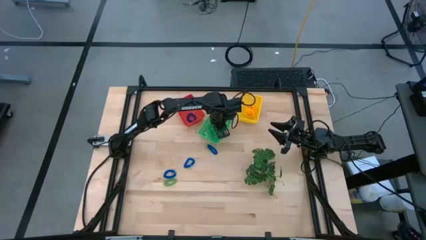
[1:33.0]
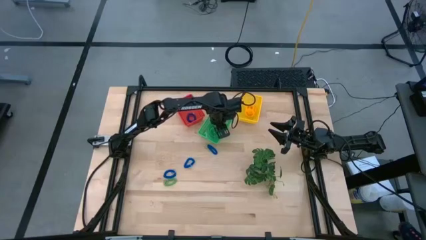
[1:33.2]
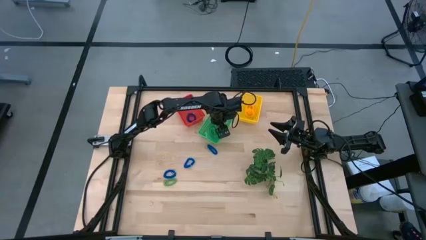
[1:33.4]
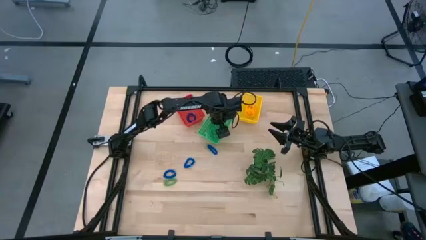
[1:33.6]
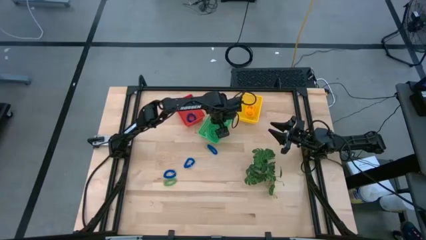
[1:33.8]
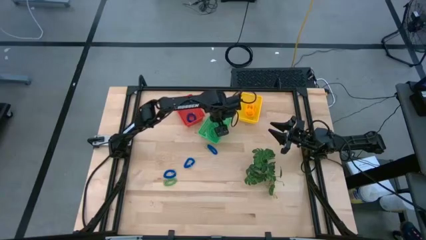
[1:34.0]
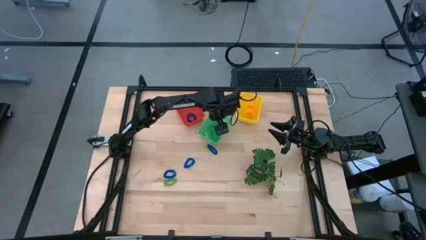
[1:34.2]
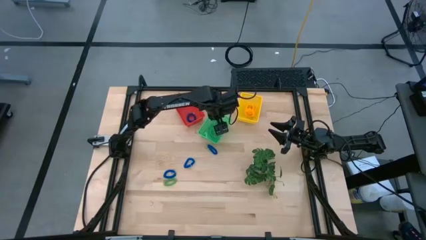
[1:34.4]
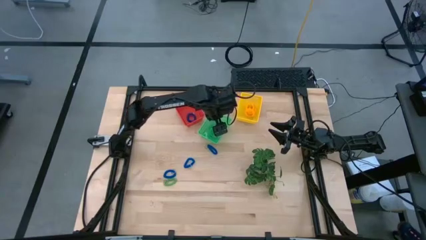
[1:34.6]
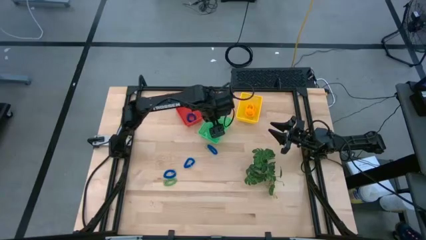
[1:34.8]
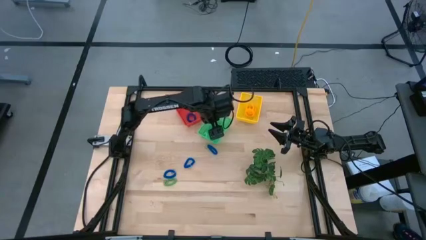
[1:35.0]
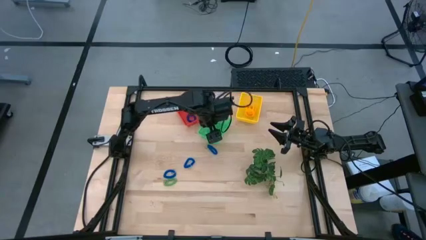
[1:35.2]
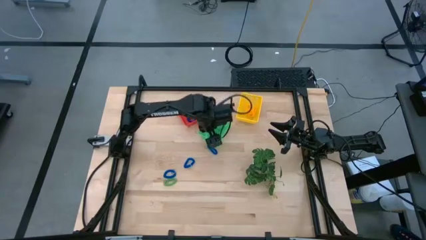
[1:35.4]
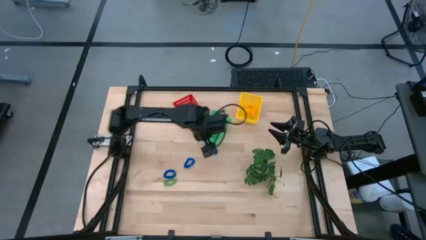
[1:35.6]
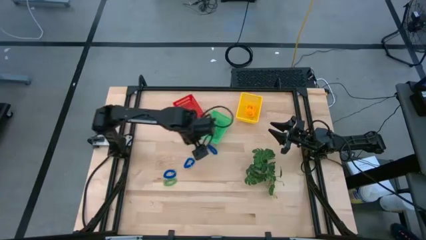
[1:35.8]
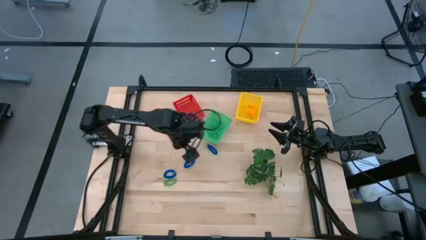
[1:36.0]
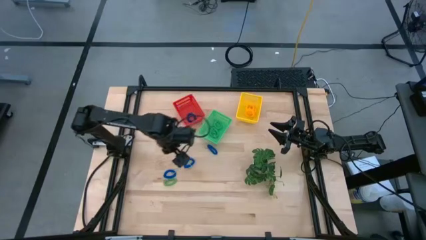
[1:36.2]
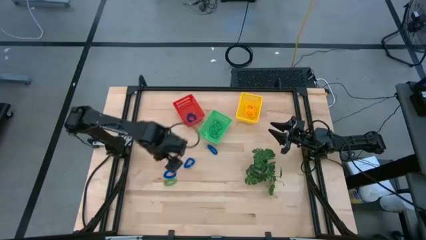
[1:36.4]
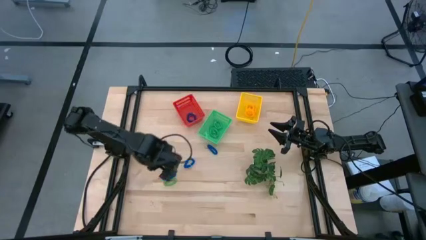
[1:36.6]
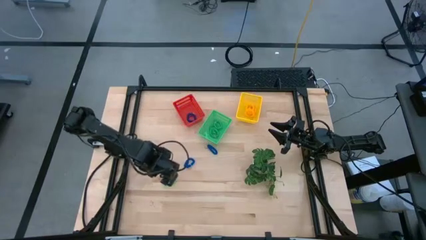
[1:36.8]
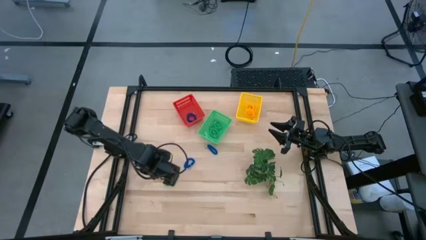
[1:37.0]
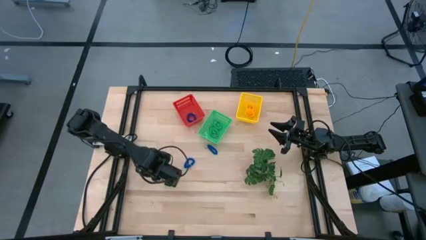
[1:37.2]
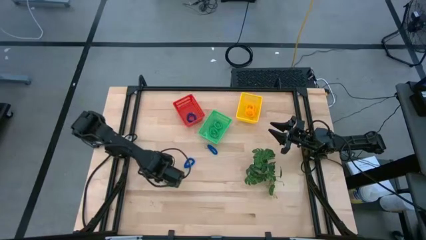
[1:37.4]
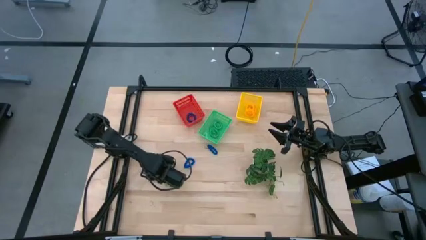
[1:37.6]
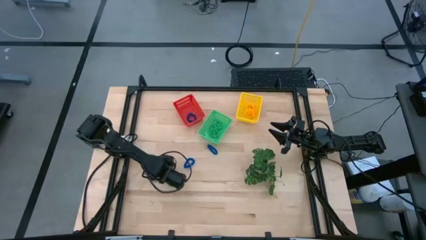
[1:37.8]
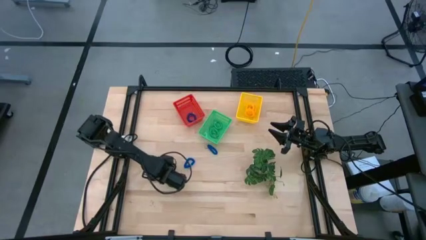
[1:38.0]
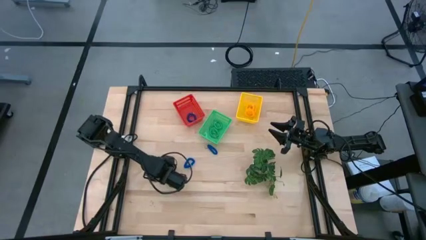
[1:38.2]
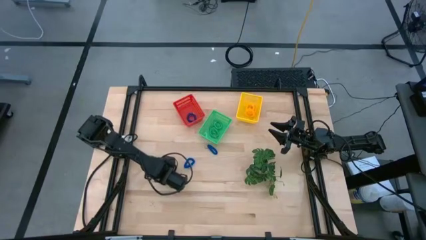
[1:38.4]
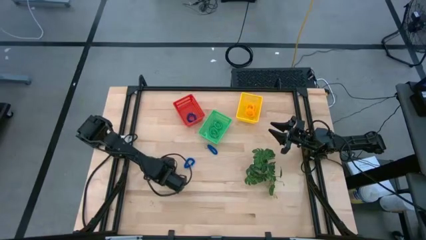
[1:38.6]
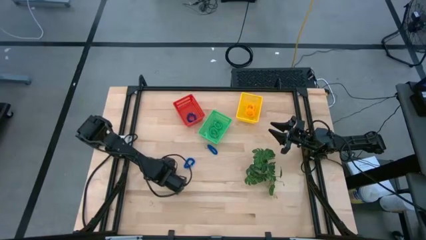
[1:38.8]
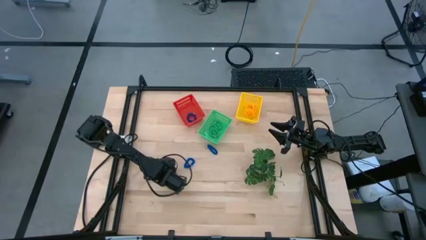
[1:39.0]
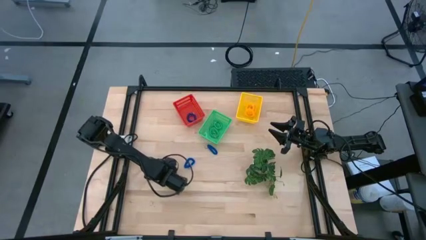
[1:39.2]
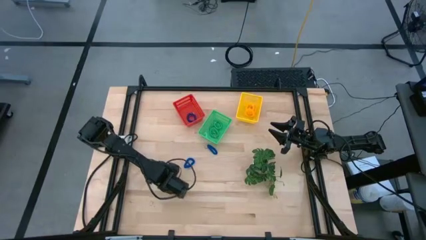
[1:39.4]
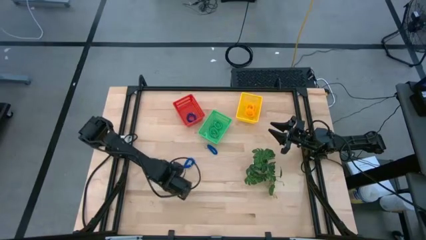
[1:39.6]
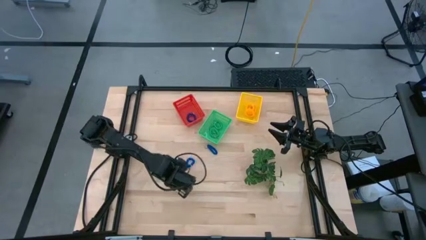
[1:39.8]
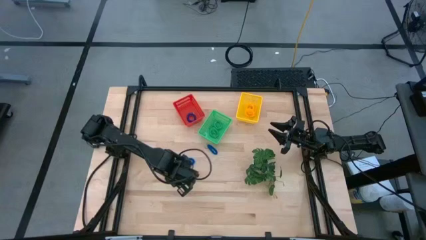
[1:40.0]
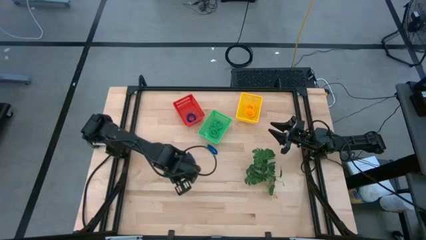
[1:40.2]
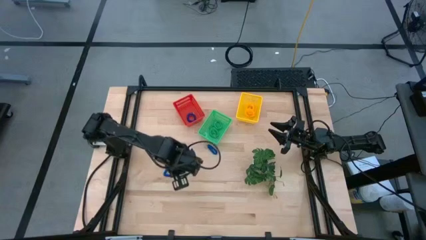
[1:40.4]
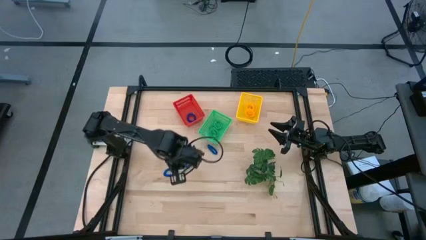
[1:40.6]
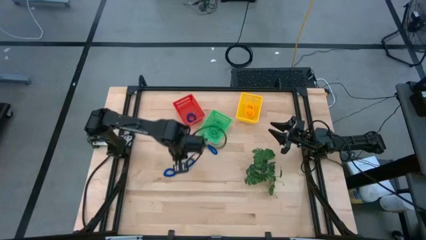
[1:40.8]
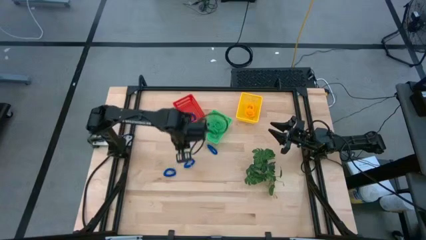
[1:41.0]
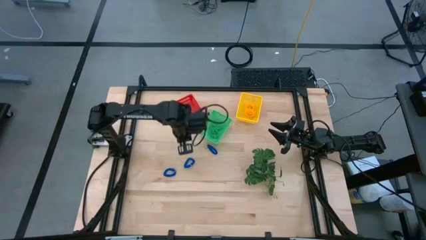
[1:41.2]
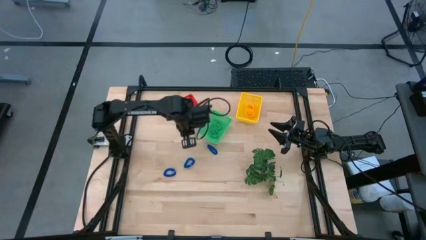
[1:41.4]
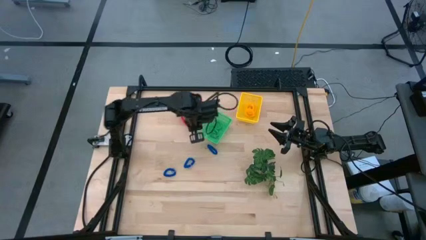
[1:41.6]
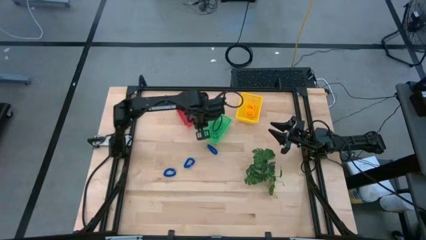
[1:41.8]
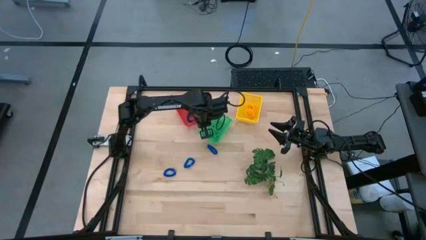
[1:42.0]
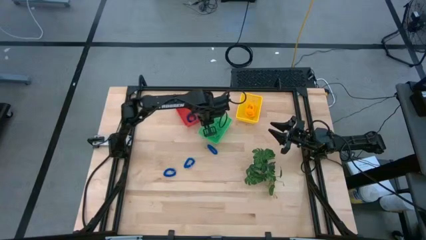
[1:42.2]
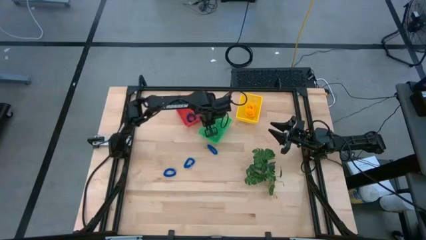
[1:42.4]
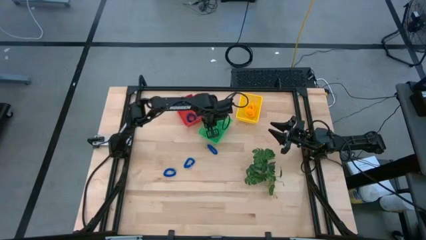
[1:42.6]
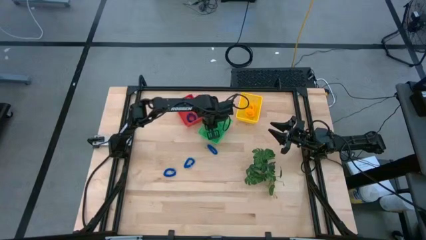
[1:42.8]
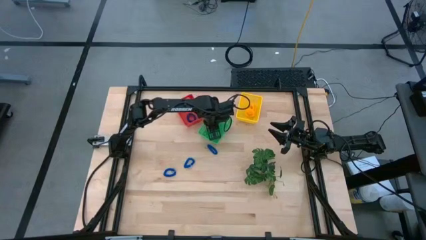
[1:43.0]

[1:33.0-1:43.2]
Task: Sort spring keychains
Put the green spring keychain into the green bin

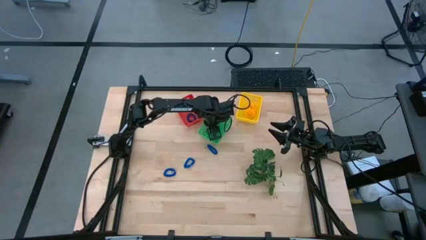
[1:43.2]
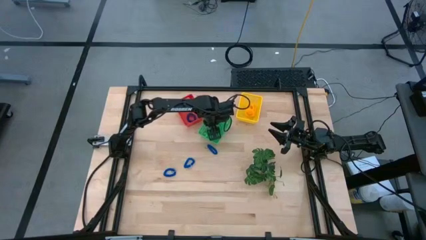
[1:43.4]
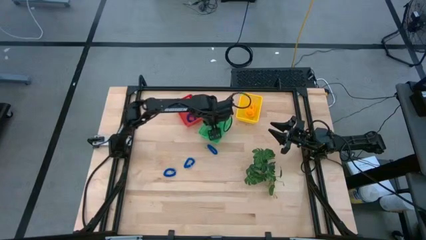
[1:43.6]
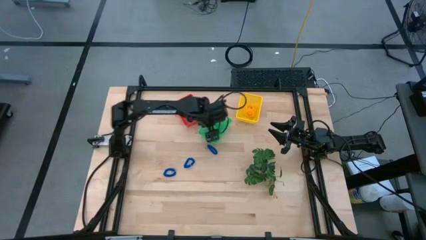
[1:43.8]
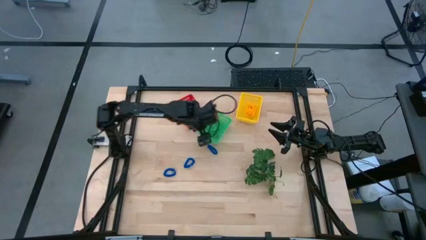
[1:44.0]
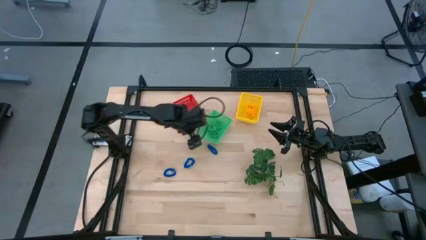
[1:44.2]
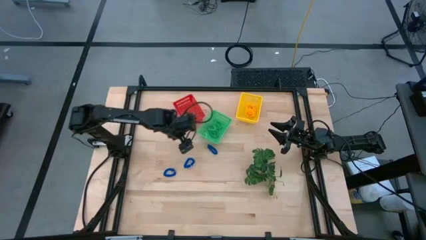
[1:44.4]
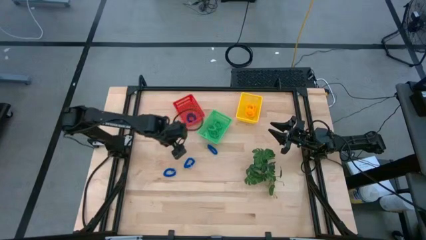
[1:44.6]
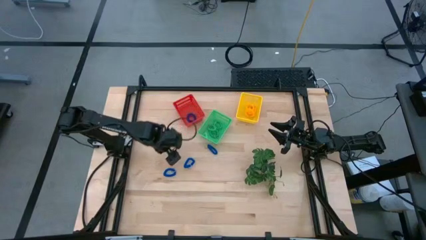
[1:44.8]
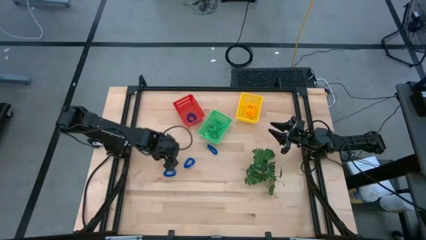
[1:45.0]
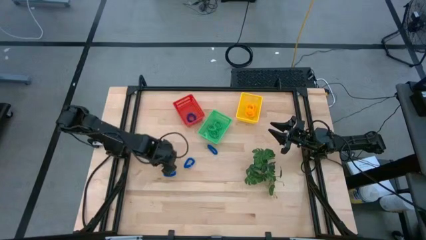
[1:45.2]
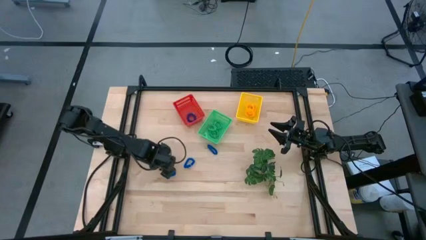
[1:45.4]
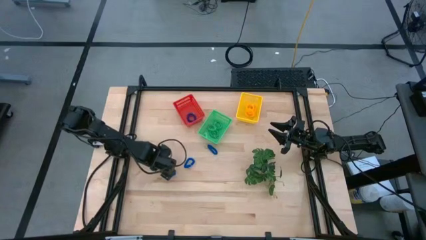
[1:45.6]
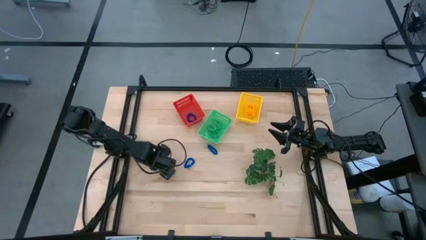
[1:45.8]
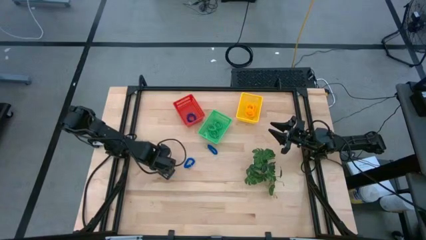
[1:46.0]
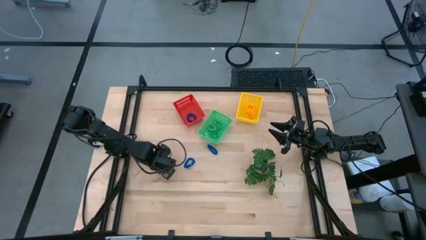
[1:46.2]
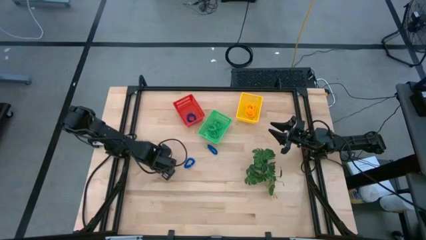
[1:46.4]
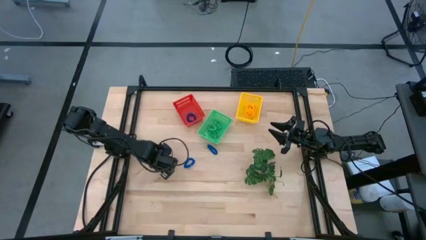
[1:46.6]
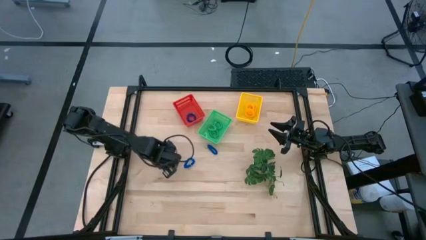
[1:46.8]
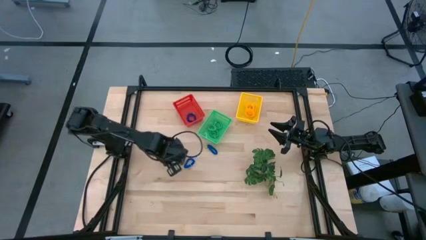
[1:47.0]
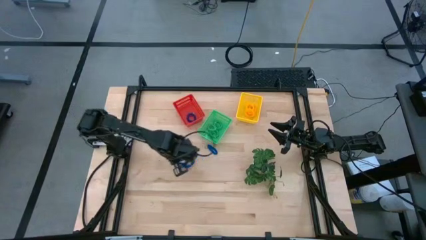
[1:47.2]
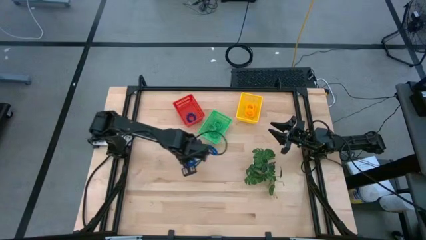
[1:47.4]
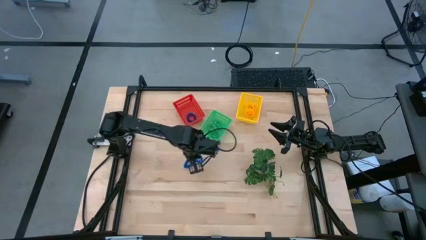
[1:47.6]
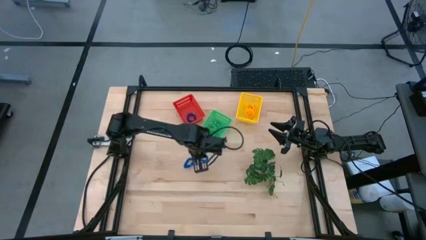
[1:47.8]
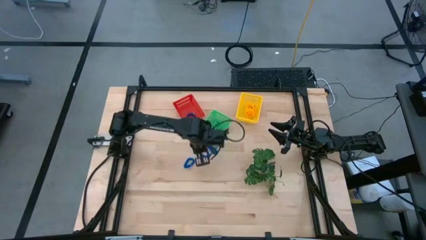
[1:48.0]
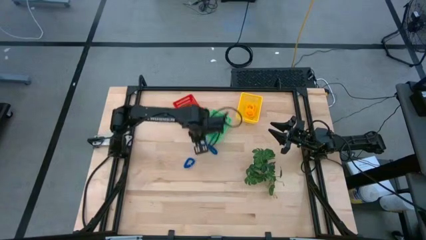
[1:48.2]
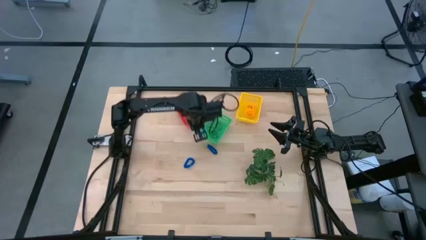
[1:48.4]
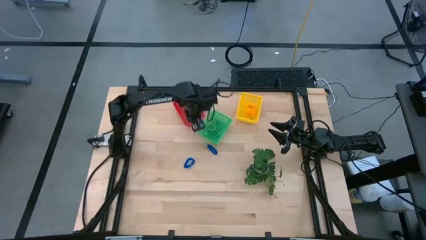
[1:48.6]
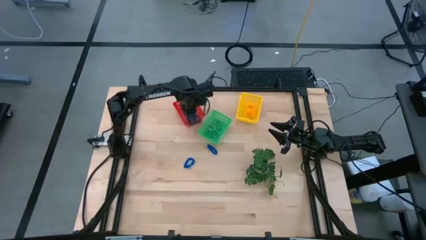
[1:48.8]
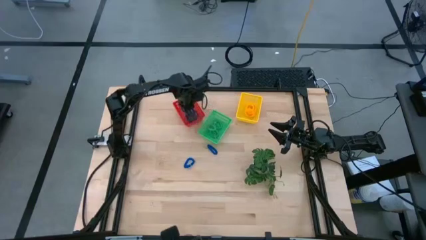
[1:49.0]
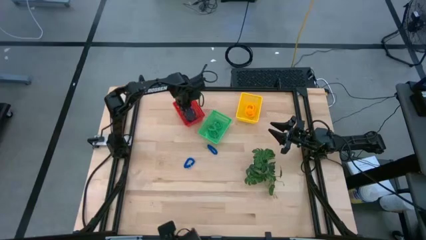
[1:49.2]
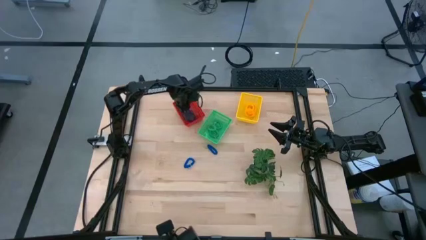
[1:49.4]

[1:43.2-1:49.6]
Put the blue spring keychain into the red bin

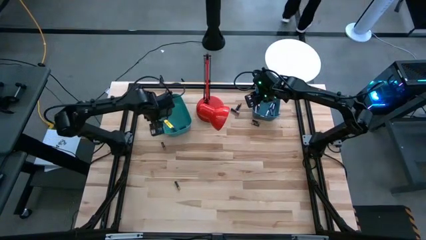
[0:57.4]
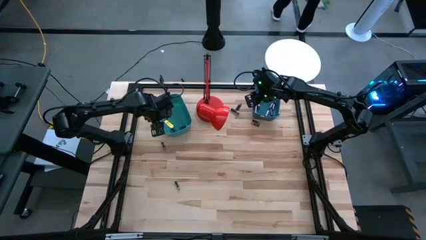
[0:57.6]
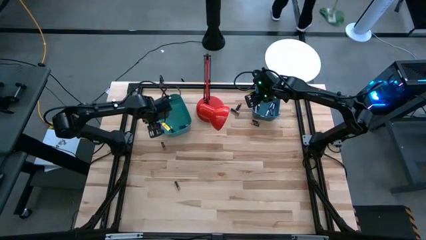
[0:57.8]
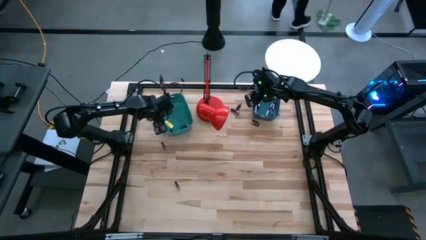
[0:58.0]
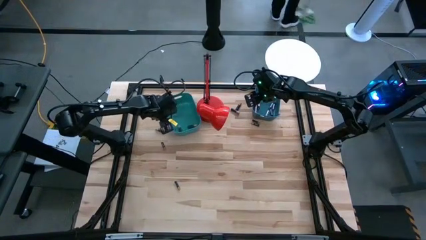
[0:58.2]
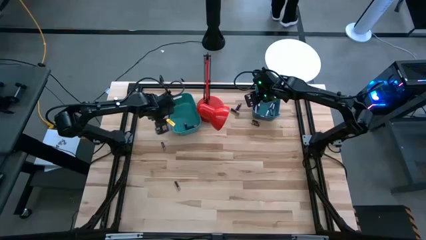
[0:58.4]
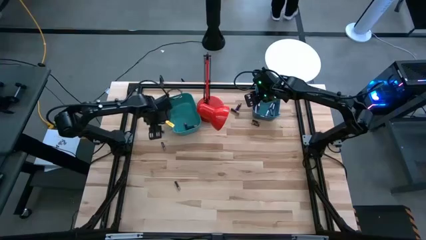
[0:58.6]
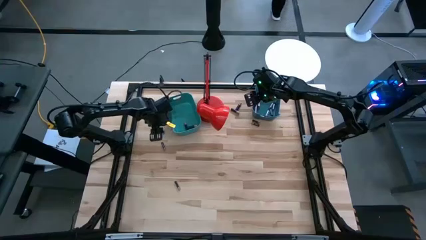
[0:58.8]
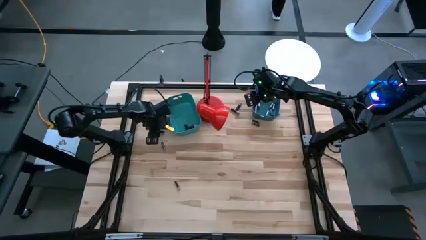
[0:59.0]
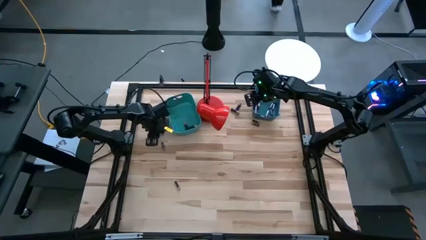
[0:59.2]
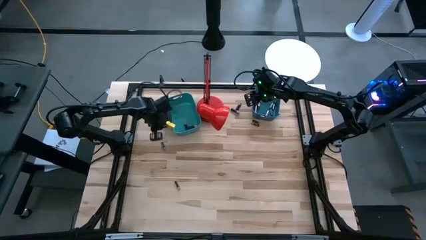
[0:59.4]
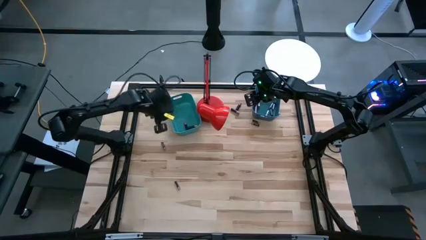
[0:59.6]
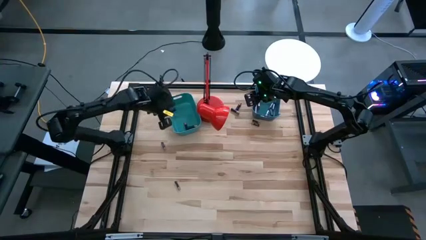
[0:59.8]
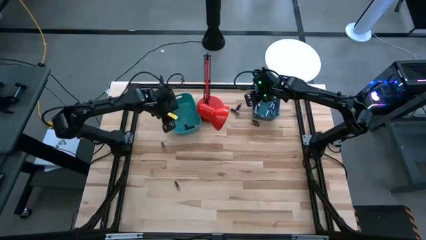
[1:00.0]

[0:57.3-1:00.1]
Task: Sort batteries
Put the brown battery into the green bin
